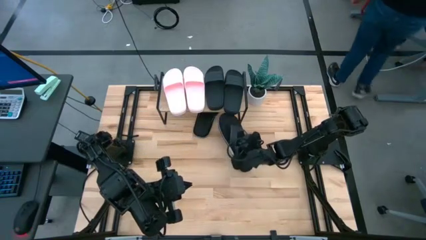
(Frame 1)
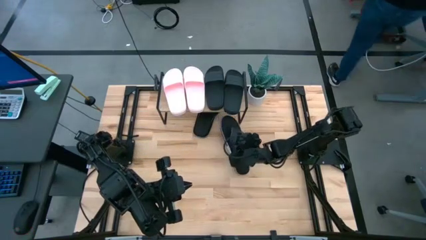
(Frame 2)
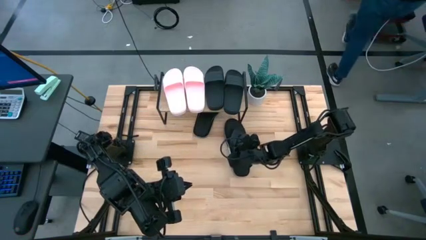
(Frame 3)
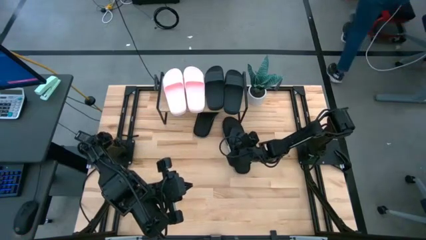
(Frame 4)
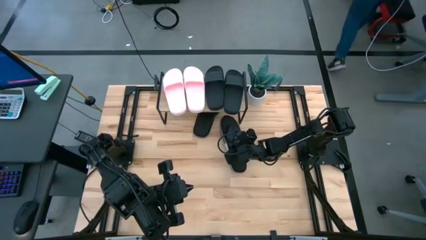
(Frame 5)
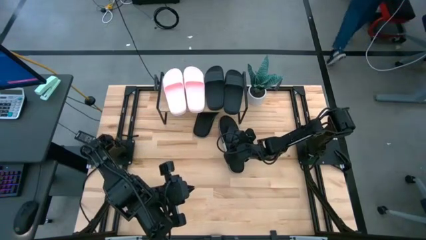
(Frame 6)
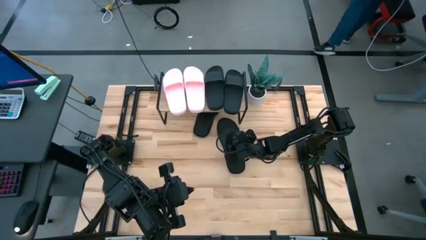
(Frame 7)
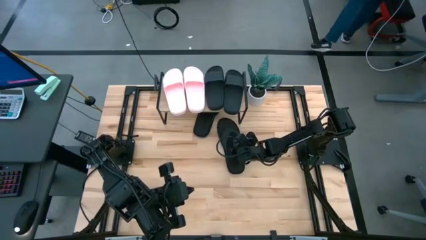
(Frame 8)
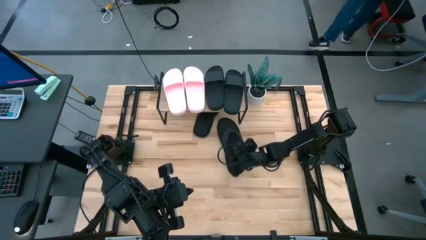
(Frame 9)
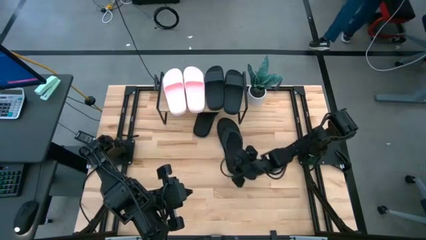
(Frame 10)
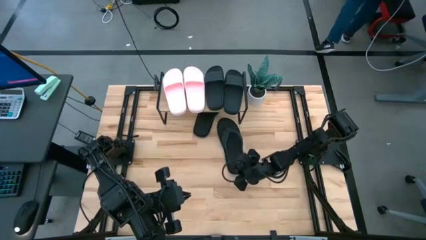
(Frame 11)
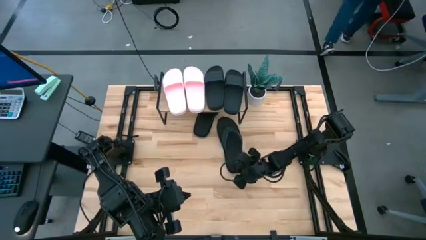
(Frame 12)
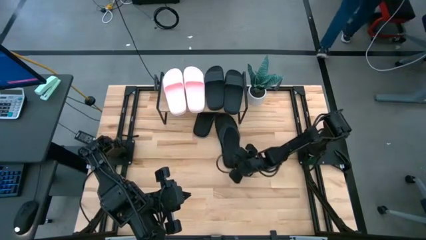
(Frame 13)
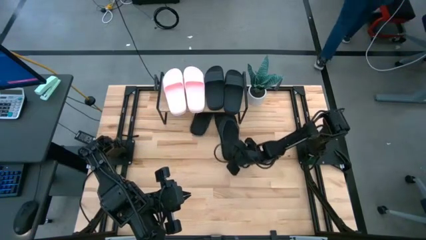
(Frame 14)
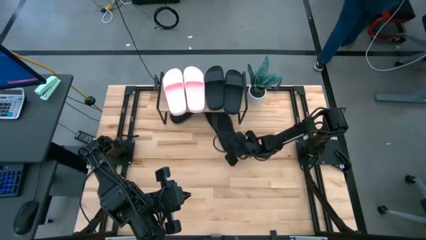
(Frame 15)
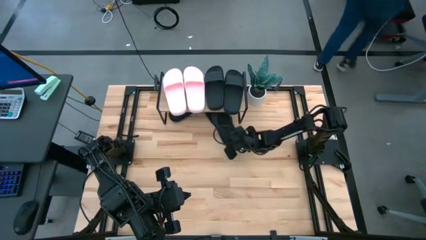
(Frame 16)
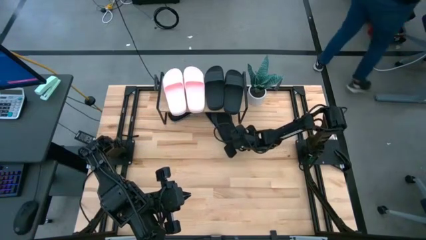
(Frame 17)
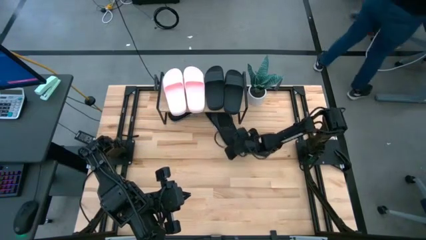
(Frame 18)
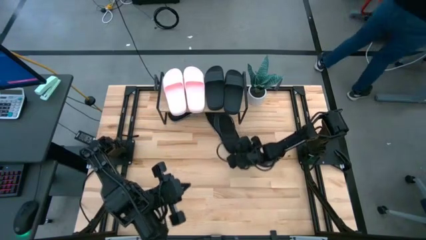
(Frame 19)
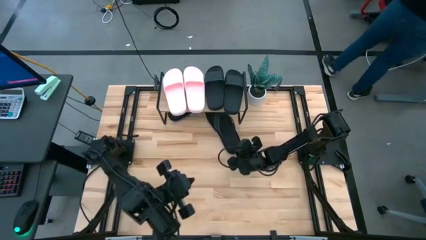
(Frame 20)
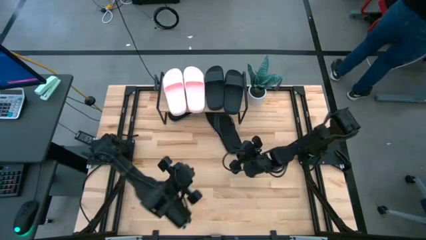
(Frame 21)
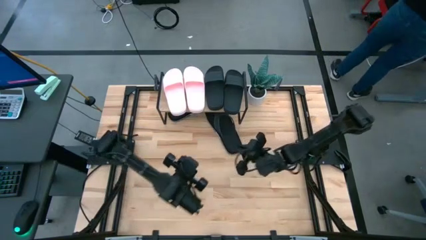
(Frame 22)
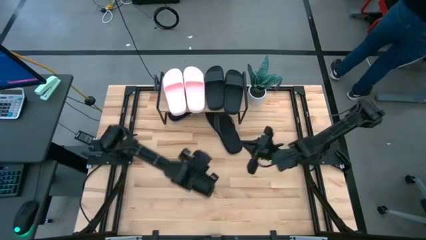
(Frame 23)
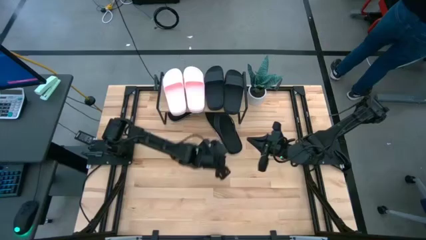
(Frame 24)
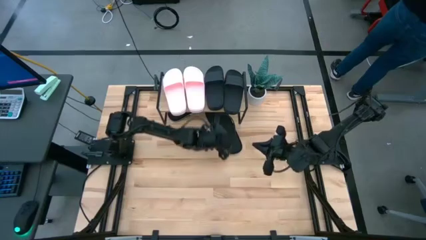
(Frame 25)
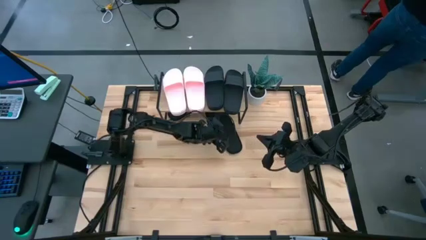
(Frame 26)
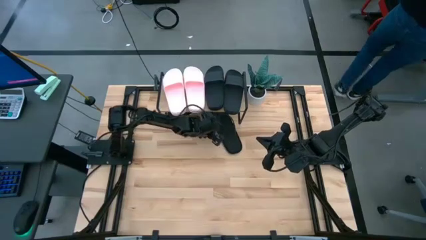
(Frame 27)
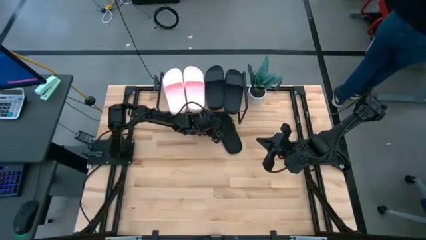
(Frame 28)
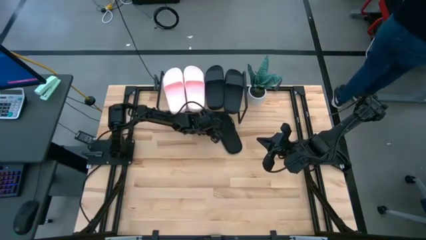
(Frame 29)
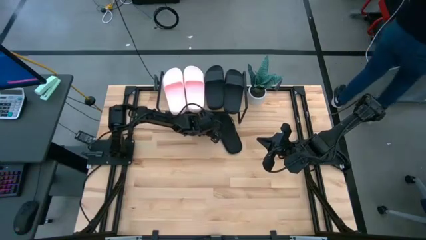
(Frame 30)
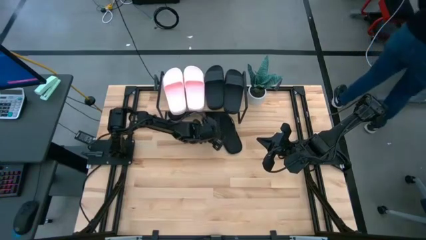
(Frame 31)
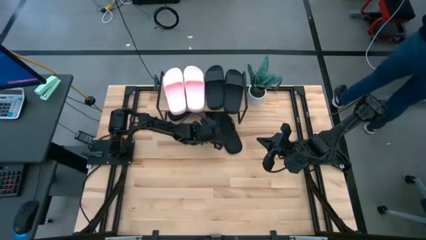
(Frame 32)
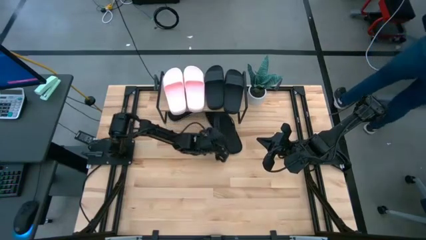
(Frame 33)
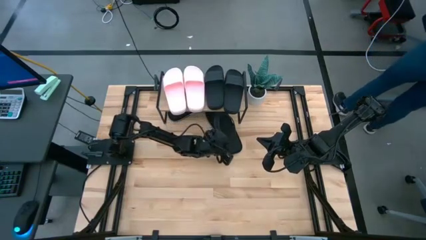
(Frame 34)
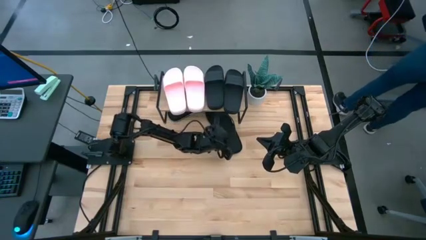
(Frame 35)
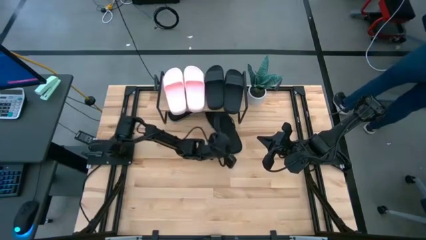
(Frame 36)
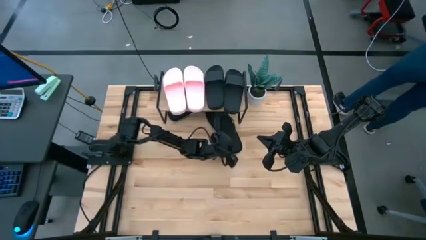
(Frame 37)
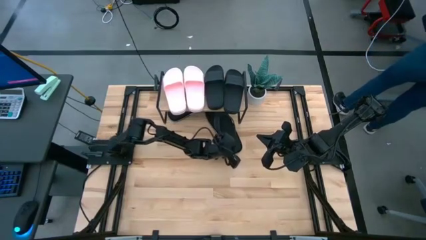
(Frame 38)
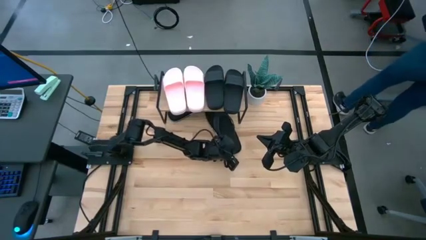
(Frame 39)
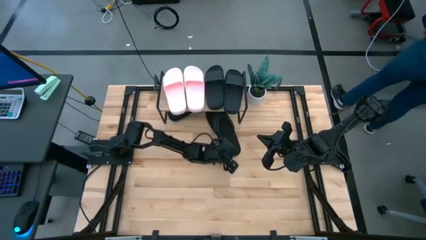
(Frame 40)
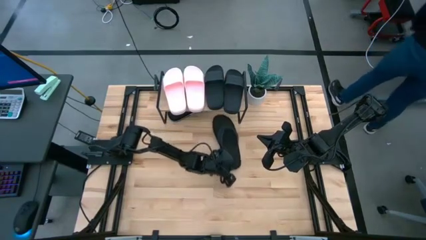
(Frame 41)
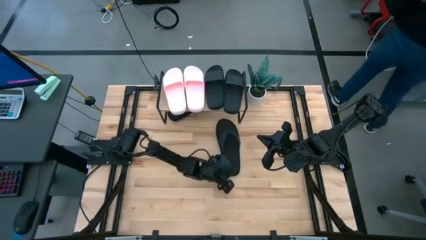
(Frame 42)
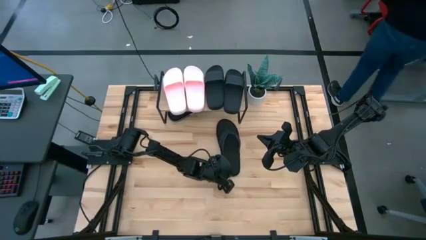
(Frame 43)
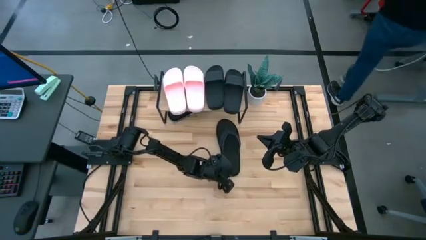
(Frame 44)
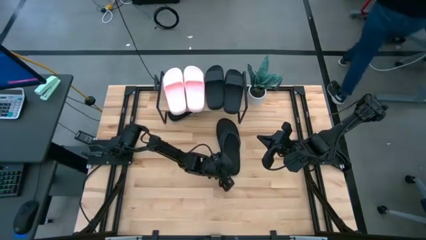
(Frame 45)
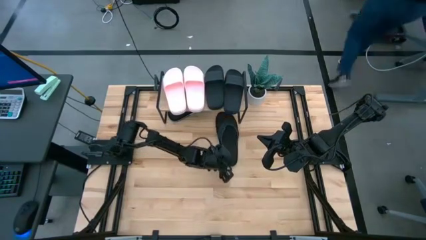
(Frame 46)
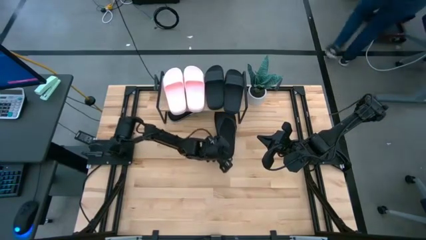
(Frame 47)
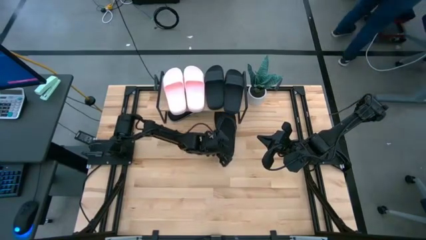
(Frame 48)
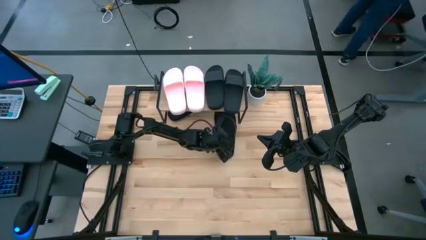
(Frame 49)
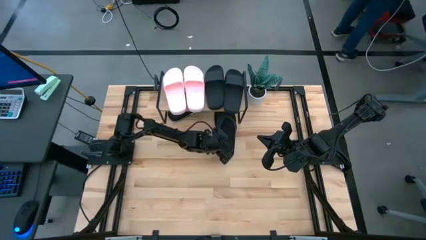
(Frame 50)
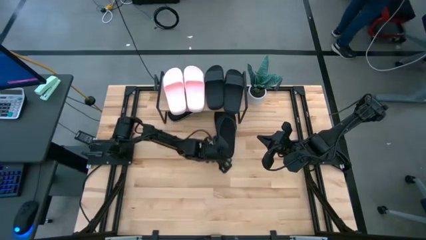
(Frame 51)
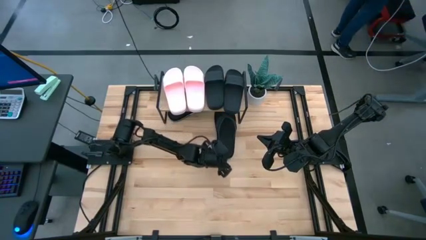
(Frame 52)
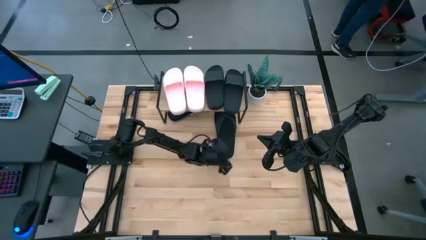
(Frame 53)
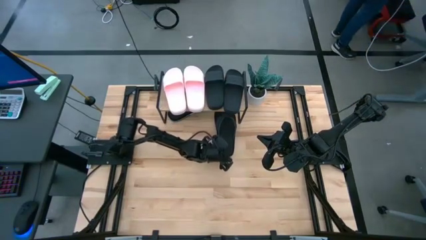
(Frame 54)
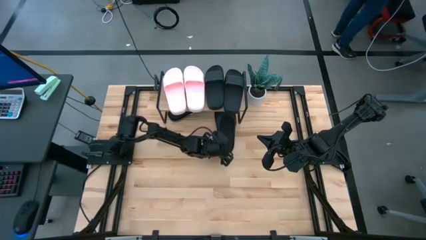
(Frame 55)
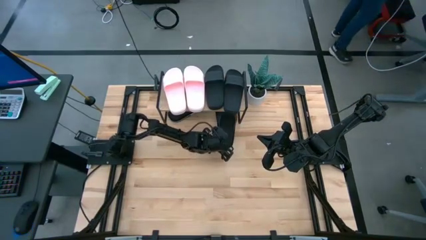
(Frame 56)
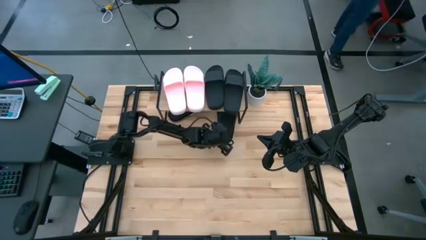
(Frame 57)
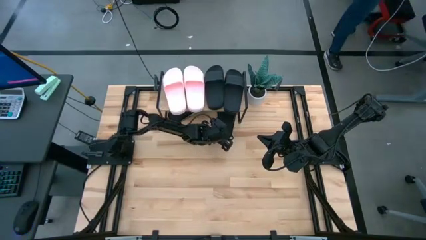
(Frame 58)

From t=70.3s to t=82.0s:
Task: Pick and place slides into the shelf
Put the black slipper under the shelf

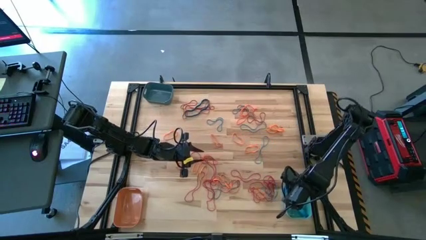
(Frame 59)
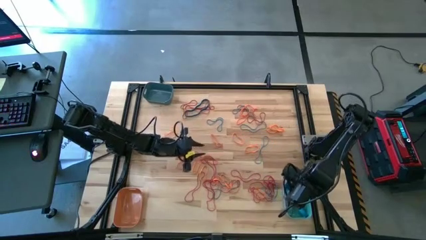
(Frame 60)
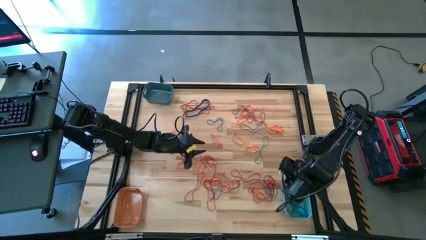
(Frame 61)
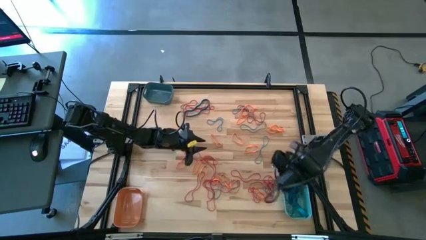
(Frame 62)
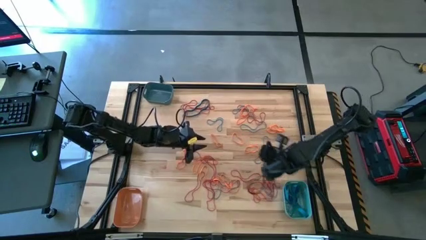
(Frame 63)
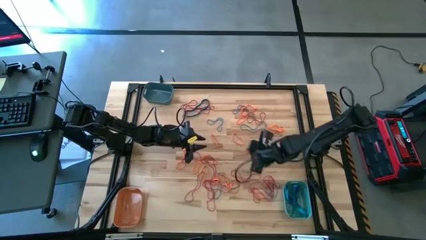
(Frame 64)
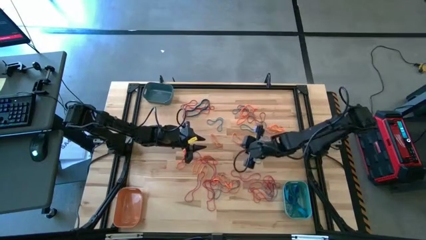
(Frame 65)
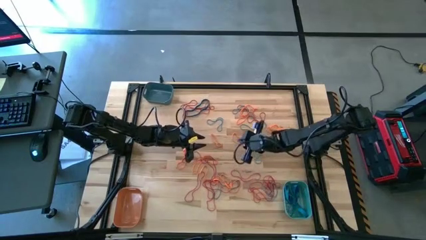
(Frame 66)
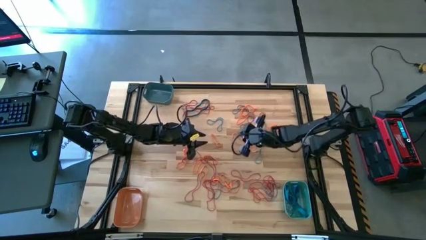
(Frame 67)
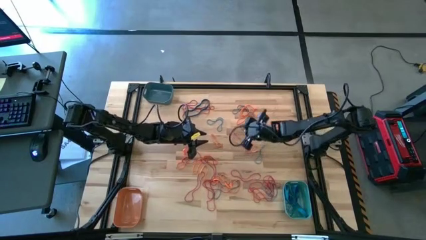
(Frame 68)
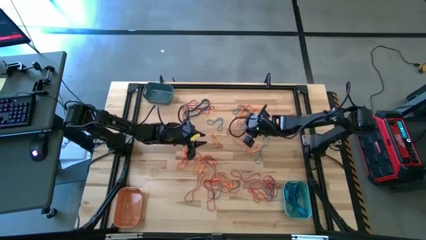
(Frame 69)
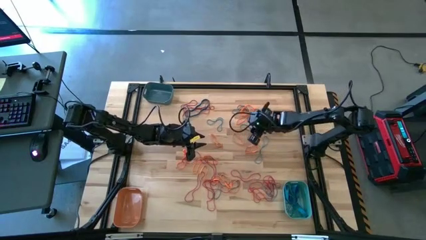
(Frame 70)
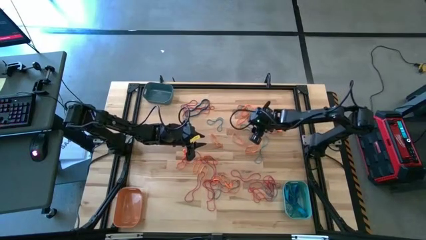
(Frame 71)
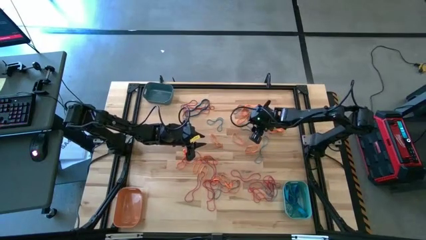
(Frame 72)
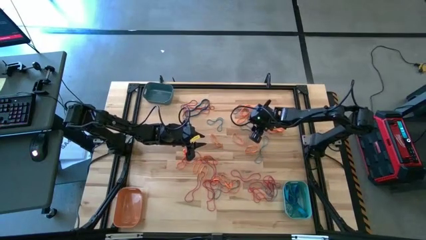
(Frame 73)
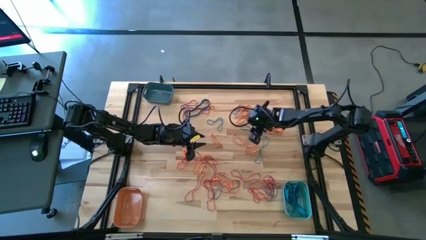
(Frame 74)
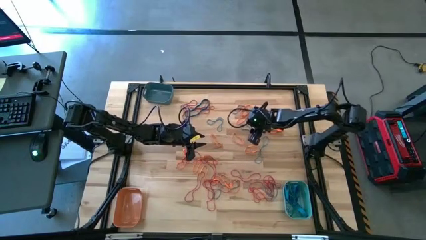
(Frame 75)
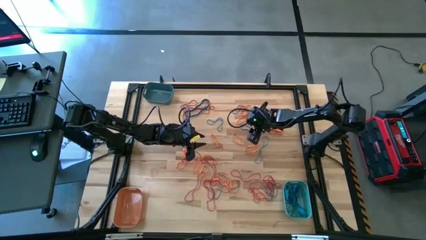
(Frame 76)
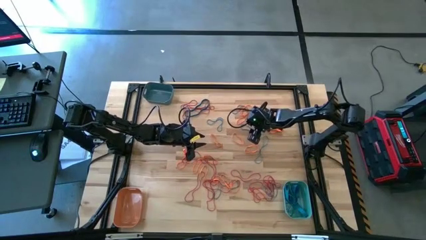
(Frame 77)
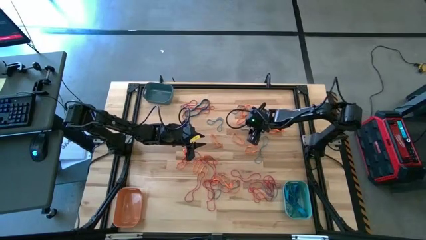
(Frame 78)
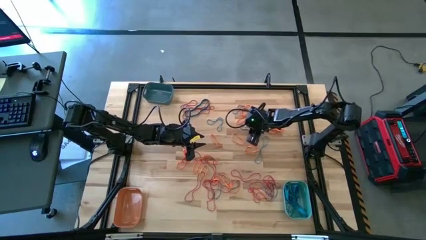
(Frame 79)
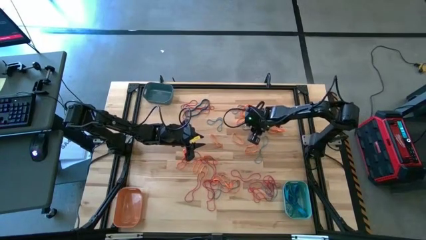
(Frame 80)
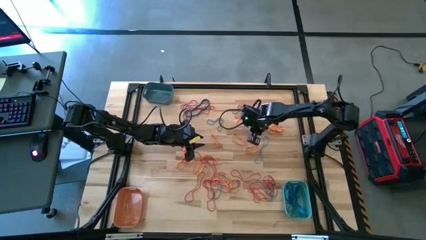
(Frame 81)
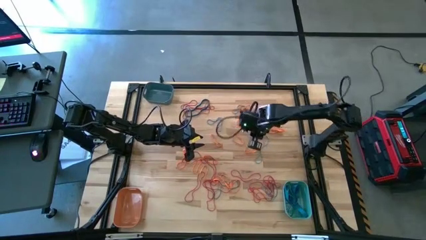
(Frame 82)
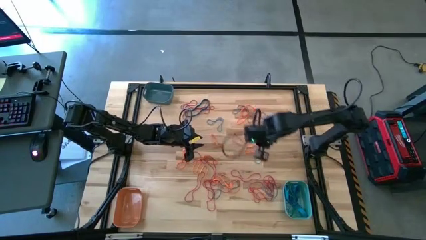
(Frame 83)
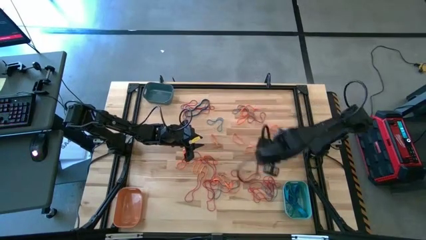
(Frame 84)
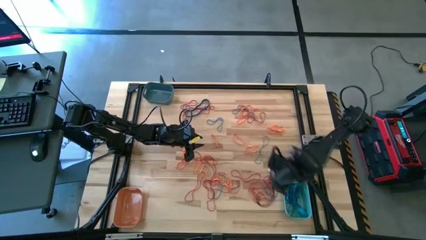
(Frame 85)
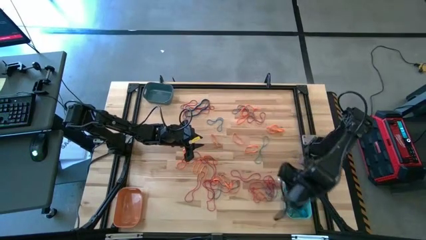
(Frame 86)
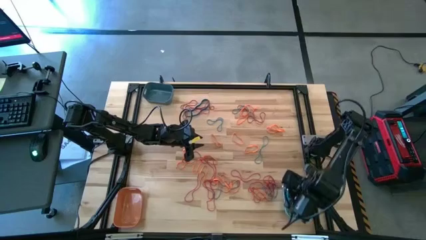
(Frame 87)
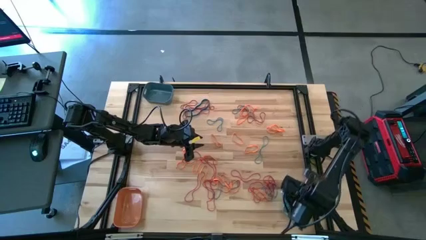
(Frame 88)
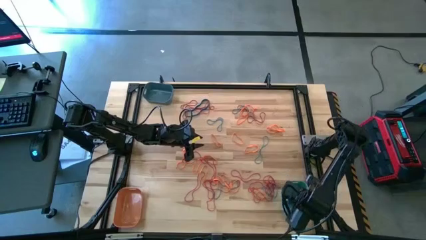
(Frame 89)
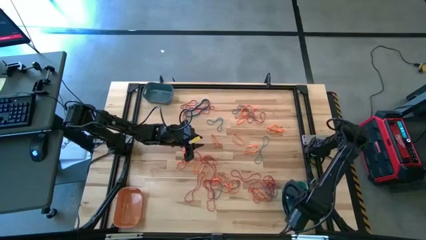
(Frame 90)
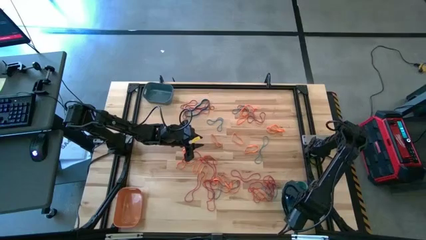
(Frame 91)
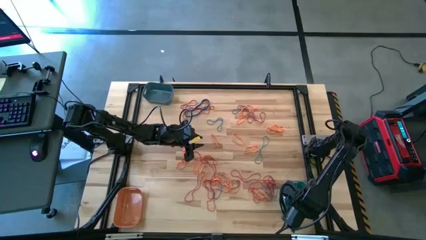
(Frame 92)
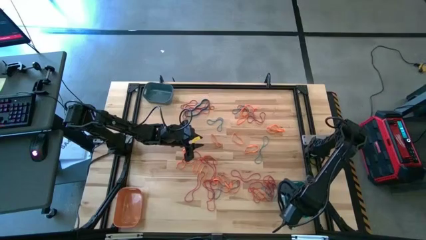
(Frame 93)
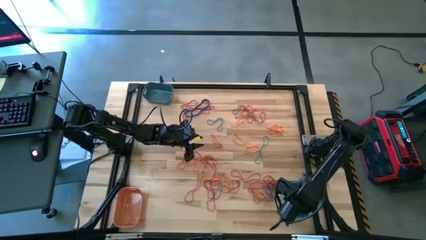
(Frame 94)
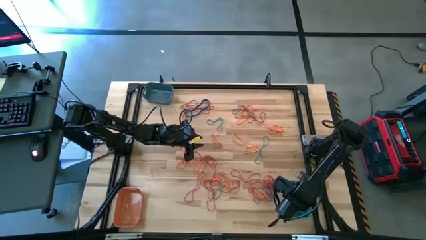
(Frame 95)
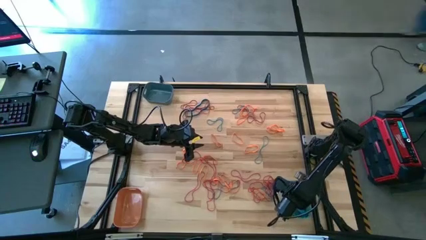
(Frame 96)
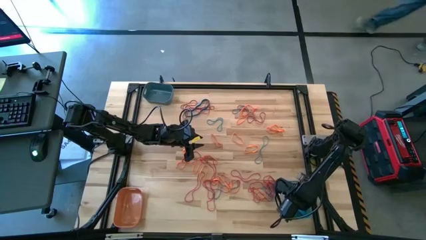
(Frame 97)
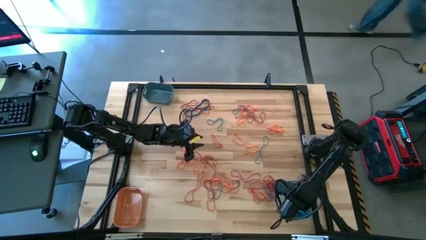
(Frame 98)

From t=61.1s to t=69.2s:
Task: Sort rubber bands into baskets
Put the blue rubber band into the light blue bin
